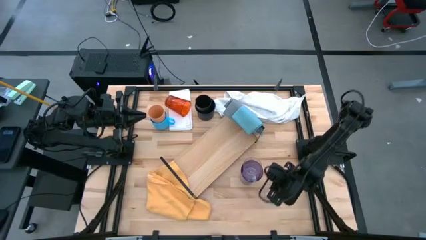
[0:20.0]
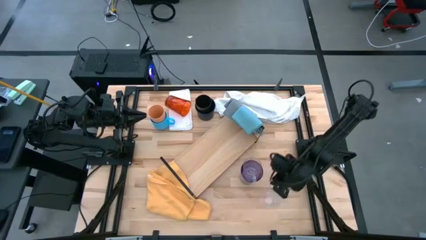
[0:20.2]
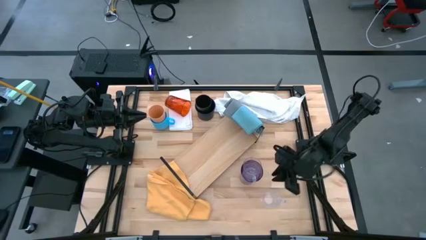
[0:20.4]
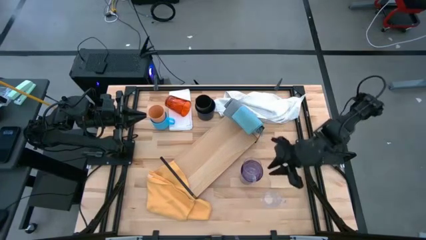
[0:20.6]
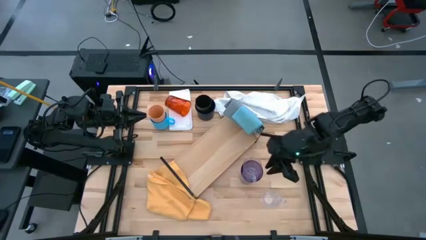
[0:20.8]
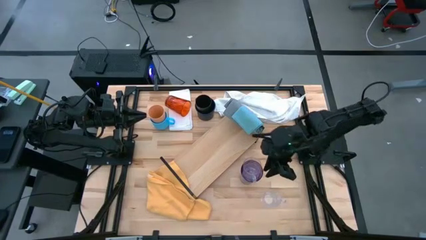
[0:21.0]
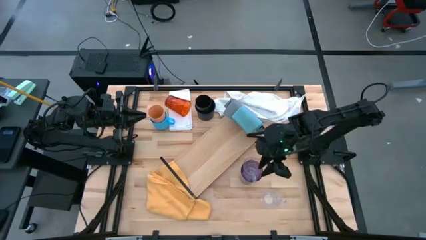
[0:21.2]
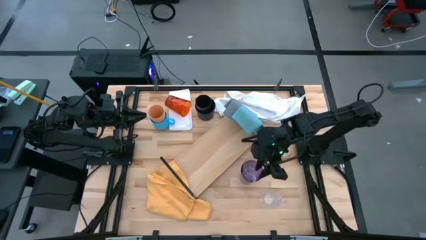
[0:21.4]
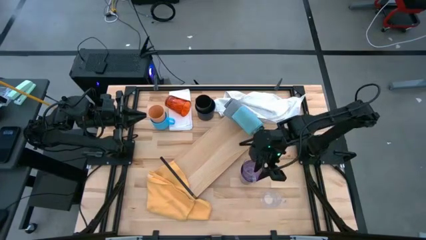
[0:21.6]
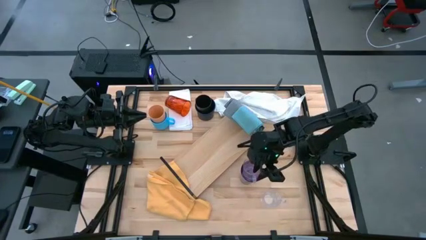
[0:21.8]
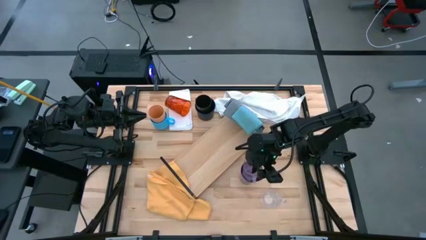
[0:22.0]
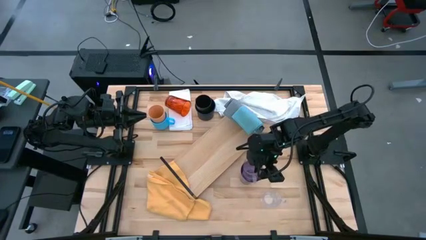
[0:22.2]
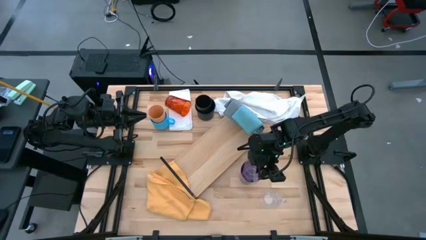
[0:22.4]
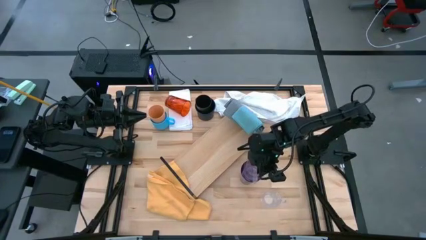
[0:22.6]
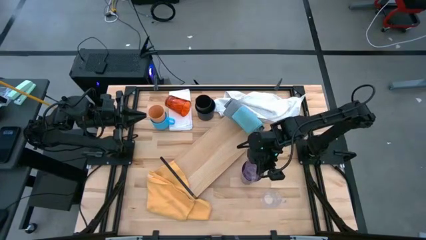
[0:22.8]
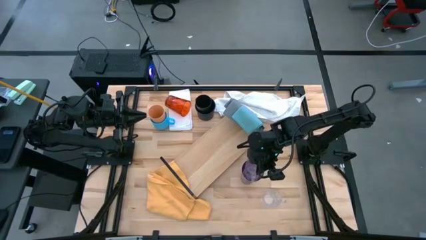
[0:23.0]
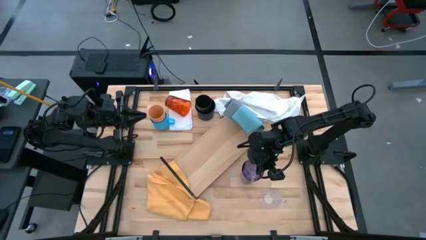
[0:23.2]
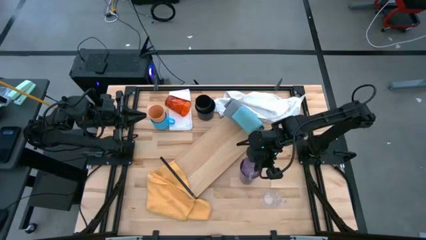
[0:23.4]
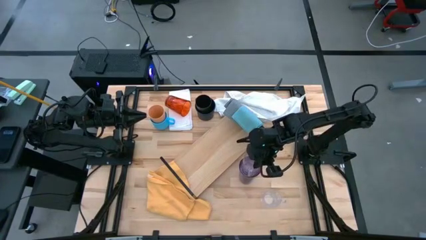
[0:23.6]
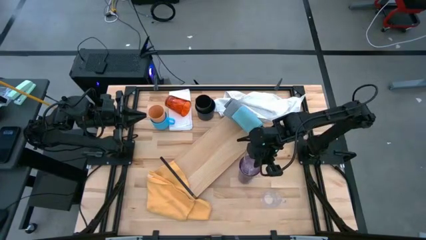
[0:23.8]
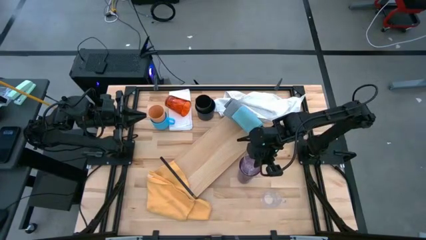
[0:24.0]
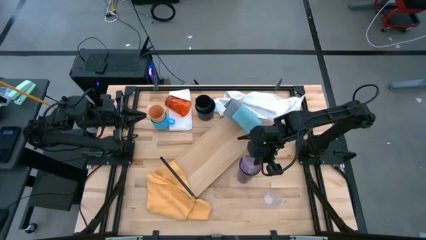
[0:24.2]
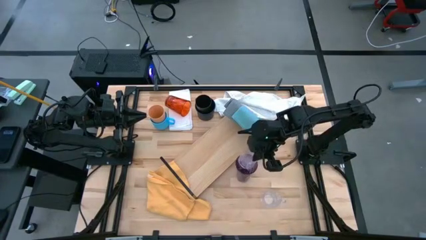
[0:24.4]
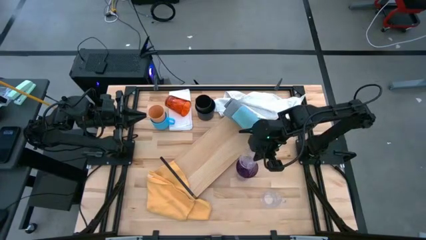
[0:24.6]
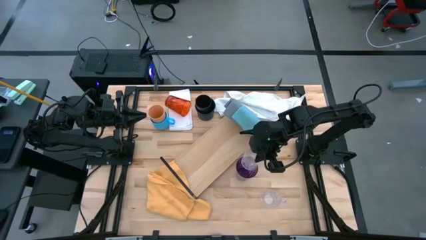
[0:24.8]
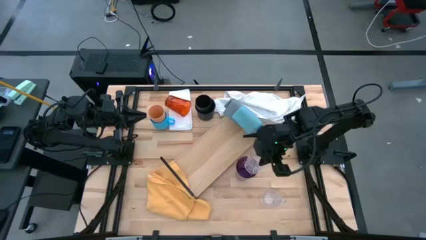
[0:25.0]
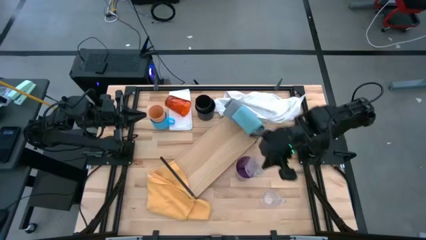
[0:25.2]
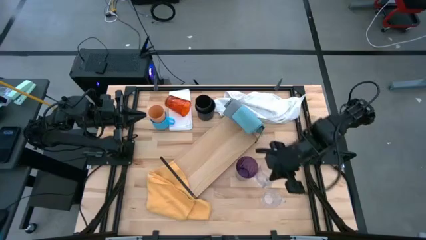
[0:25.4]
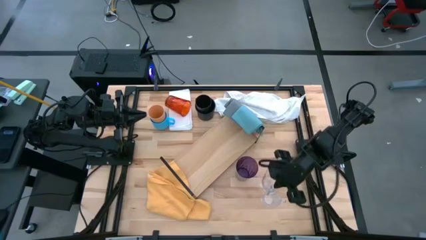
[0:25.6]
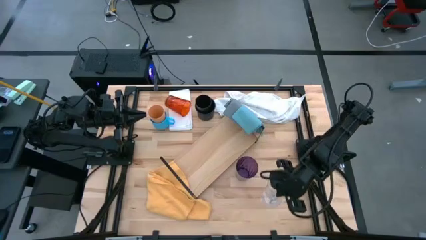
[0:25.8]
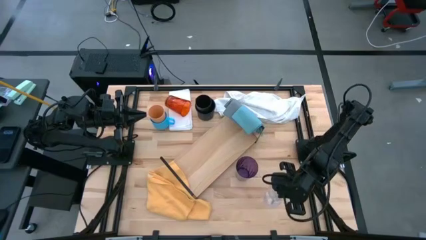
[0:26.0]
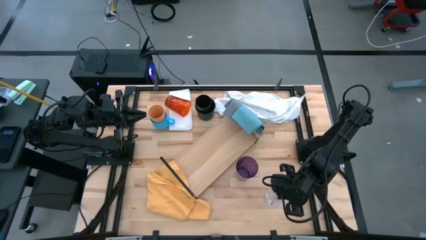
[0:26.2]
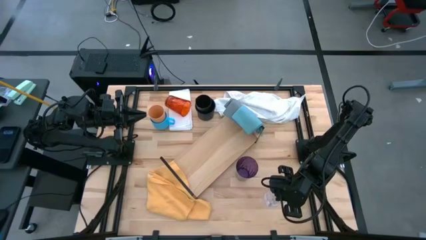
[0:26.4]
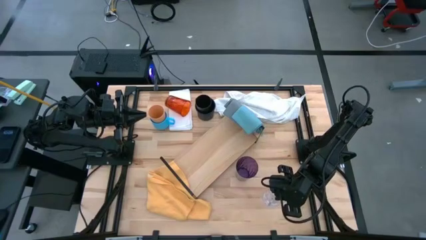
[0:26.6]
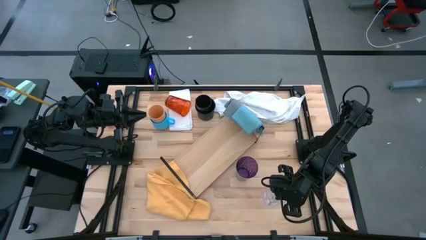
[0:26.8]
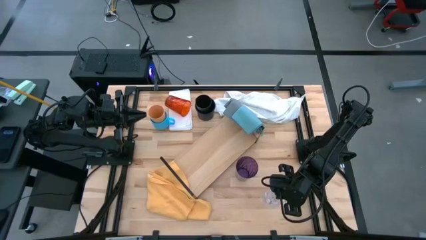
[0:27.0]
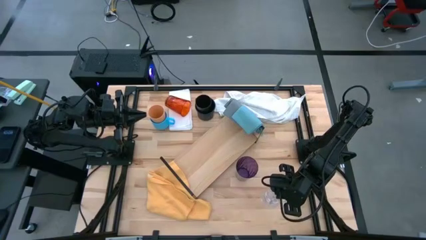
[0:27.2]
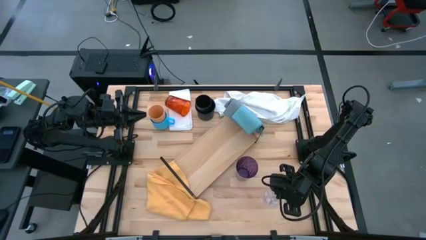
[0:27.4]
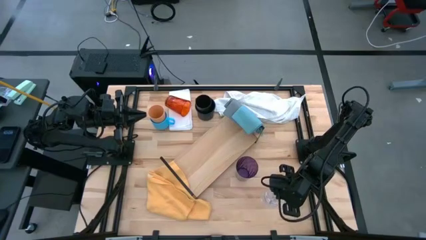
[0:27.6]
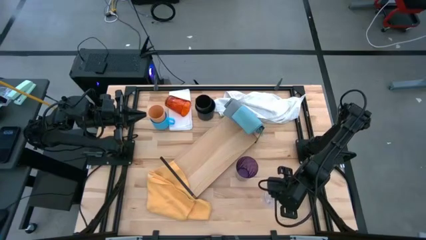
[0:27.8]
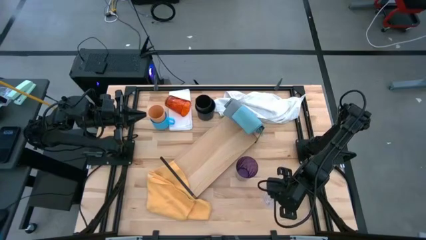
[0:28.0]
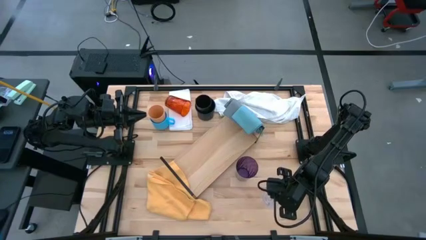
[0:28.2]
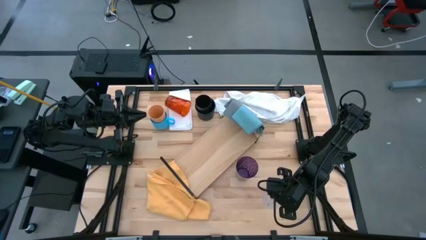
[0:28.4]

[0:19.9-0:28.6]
Task: Stack small to large cups/mugs on shelf
Stack the transparent mug on the mug

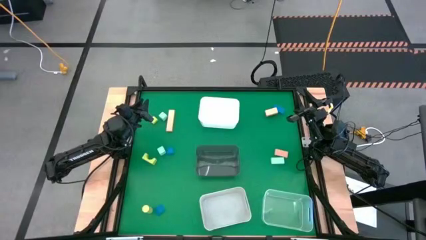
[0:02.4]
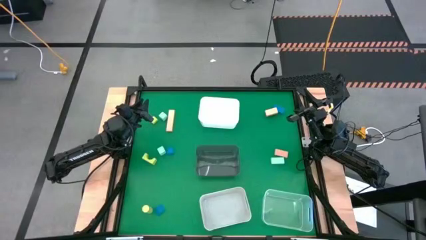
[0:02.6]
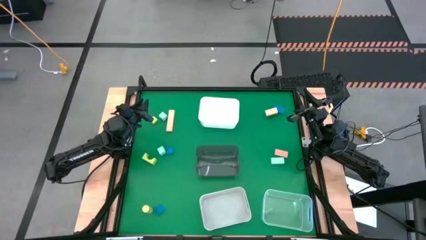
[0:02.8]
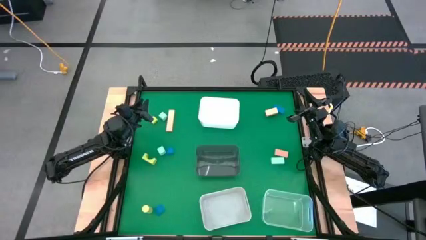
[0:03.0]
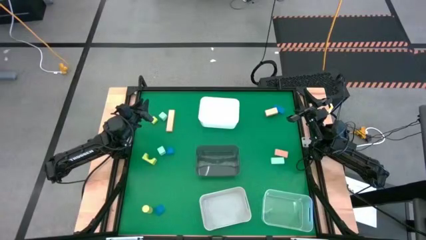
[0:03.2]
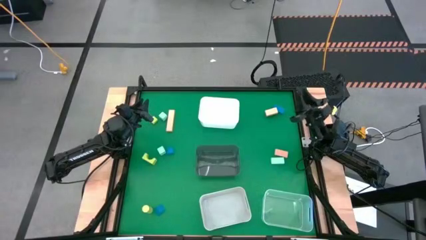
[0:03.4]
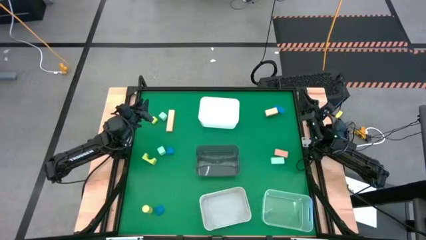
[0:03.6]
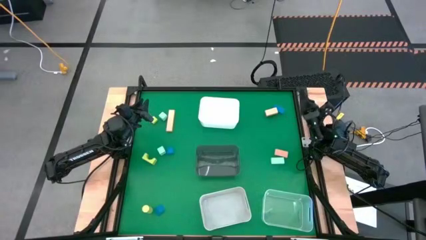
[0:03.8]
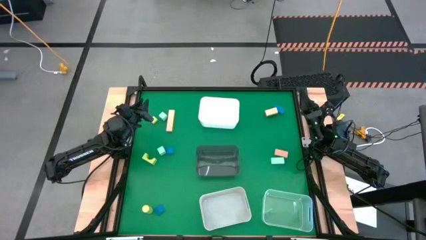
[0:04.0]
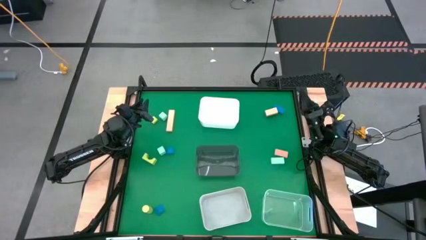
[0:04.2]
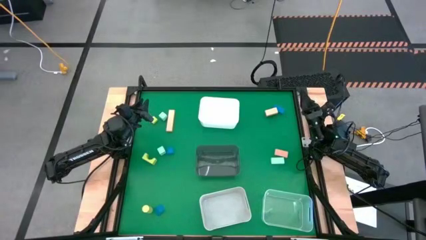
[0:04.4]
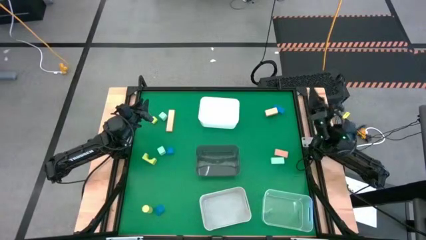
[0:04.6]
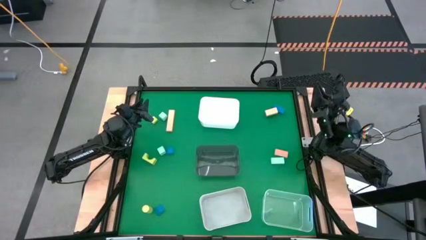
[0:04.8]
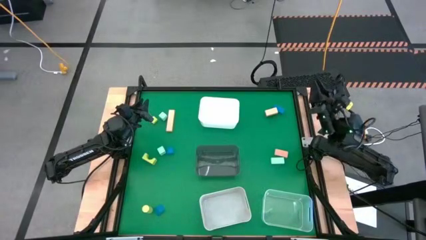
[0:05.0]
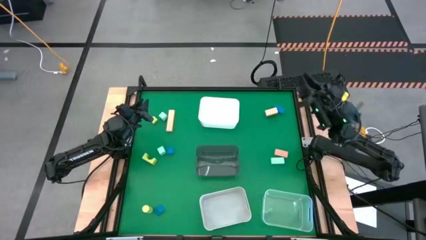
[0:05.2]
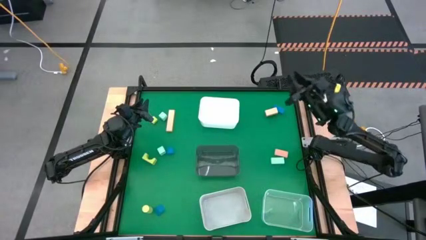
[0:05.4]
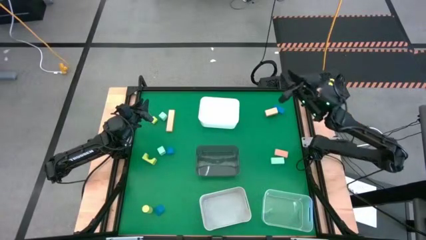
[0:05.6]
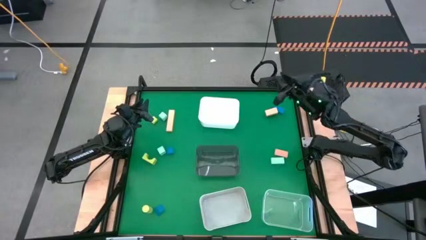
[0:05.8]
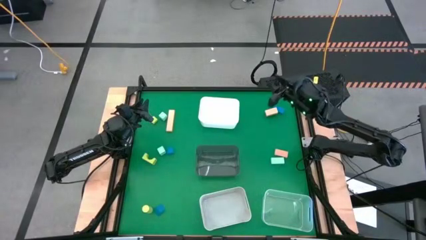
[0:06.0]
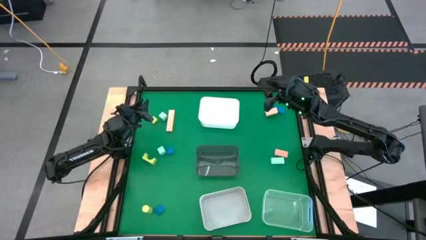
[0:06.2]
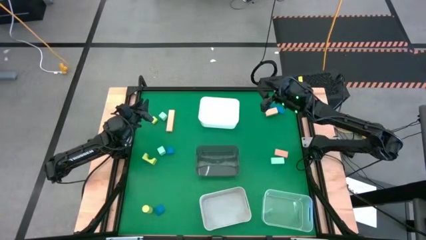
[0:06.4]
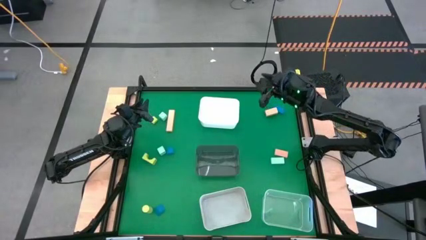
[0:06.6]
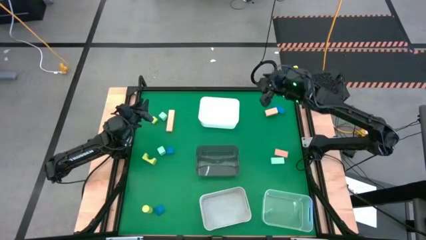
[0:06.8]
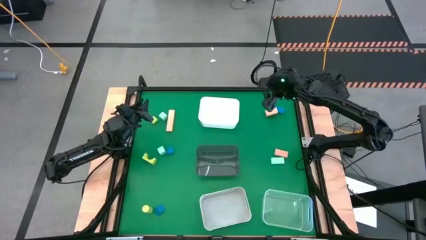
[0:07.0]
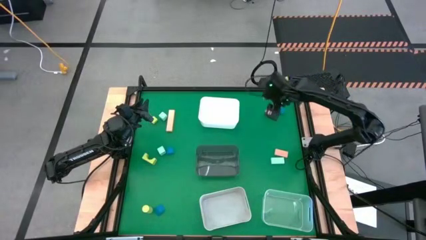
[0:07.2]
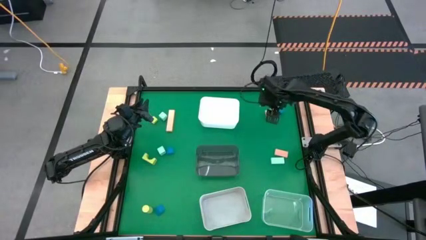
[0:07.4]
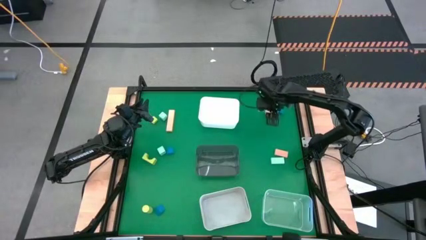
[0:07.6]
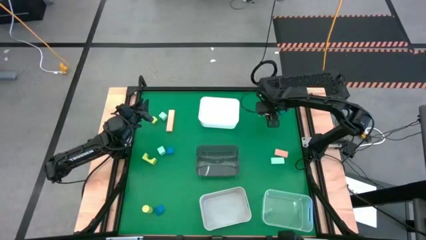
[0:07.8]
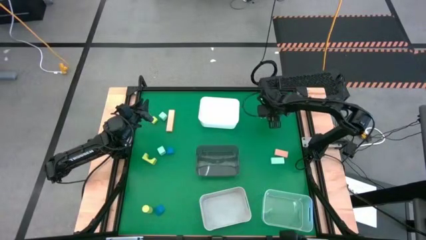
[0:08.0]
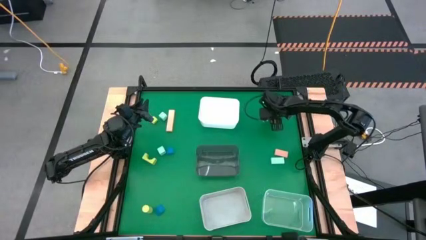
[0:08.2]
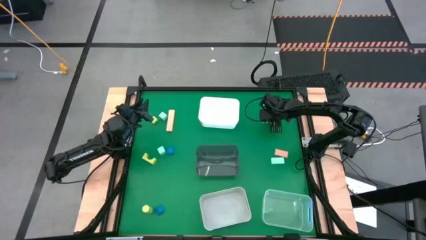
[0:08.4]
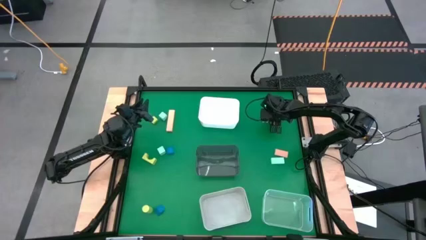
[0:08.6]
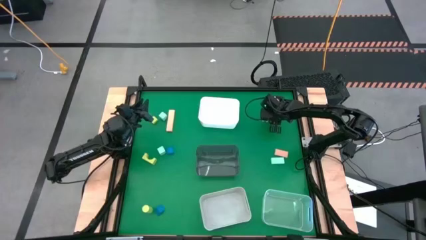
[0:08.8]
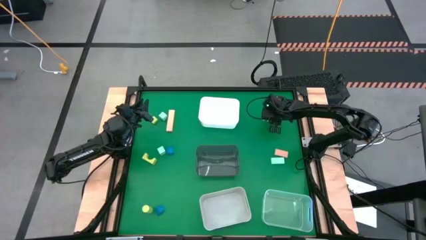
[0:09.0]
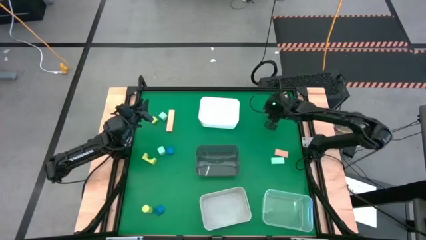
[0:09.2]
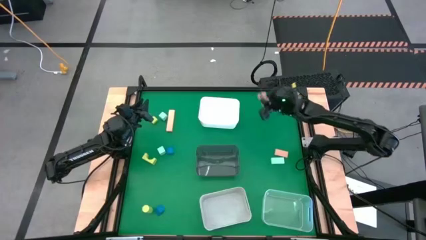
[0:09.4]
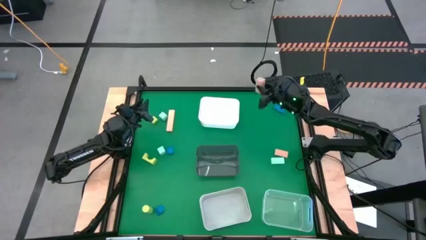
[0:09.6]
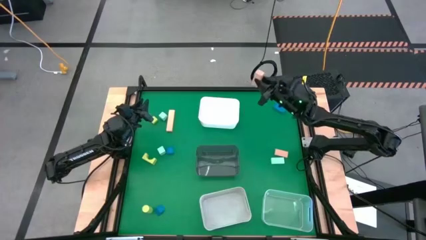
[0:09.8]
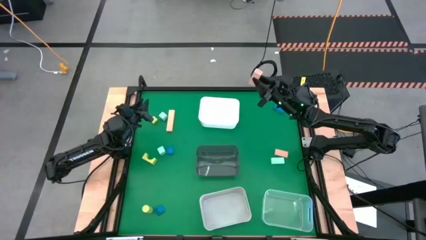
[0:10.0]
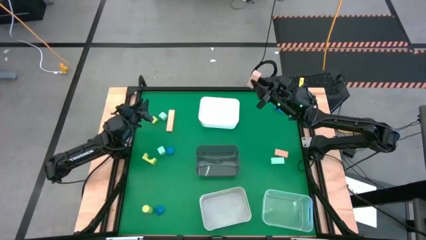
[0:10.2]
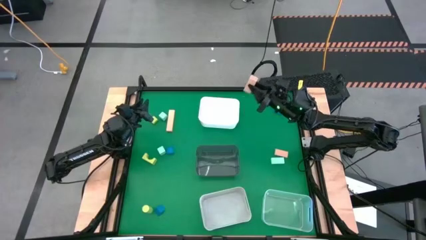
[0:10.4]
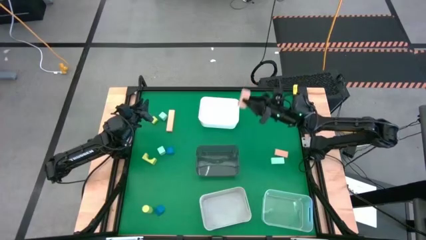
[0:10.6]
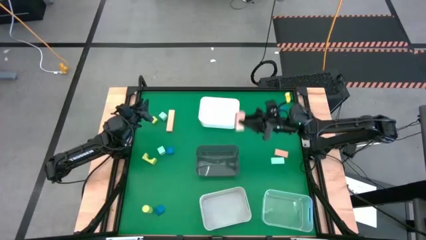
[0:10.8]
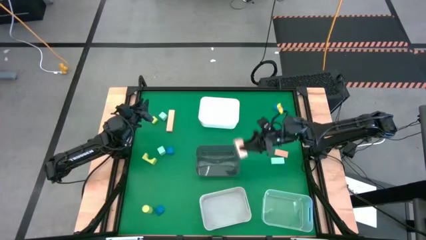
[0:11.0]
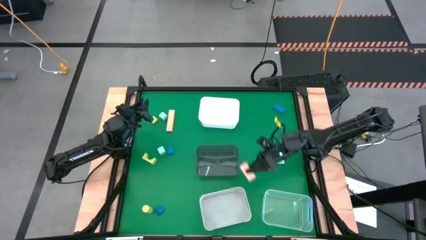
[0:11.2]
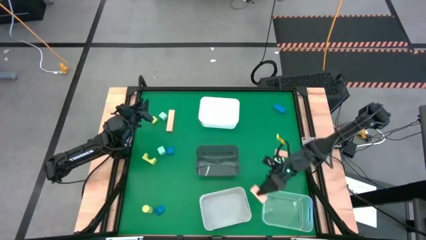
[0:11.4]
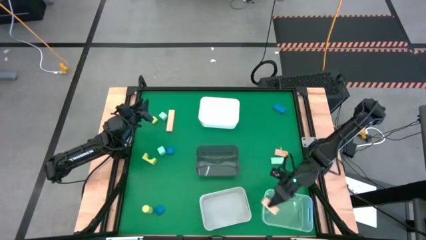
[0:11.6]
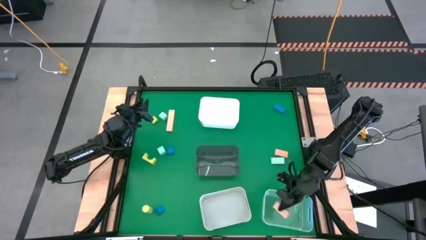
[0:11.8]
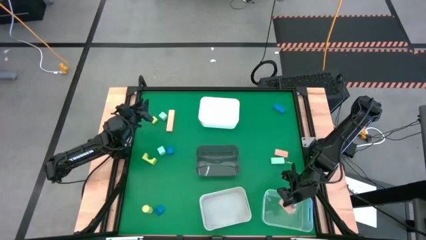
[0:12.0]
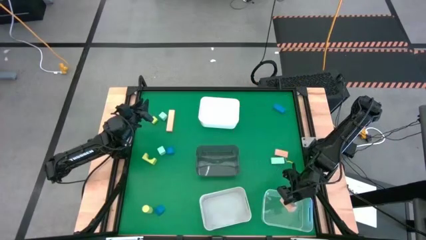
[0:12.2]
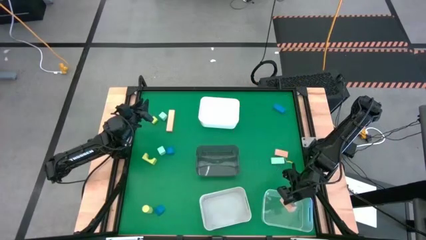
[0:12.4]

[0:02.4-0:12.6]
Task: Sort & place blocks by color
Put the top right light brown block into the transparent bin
